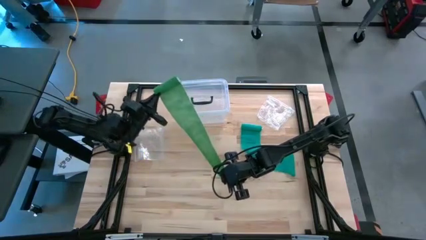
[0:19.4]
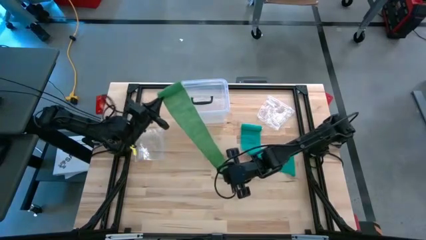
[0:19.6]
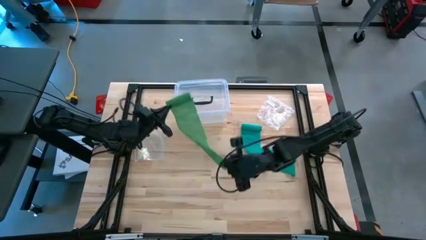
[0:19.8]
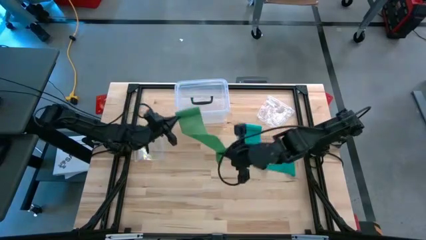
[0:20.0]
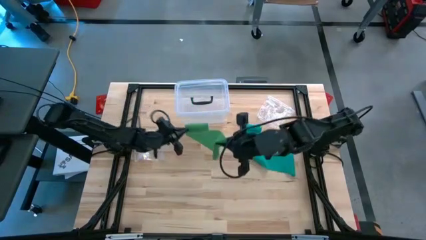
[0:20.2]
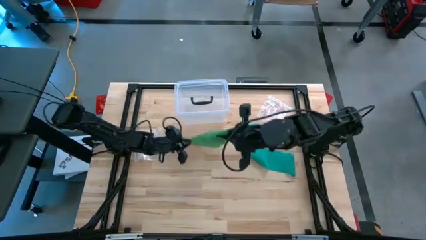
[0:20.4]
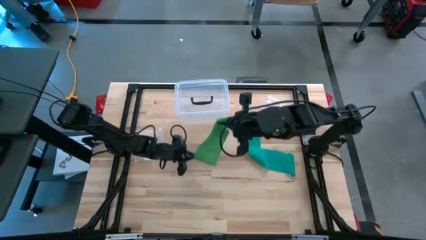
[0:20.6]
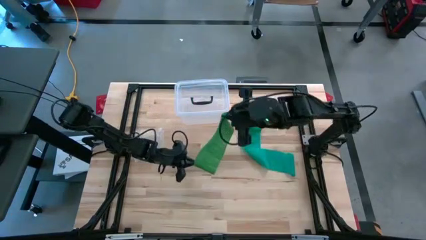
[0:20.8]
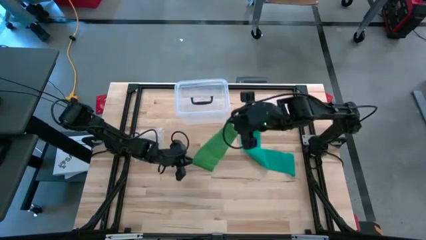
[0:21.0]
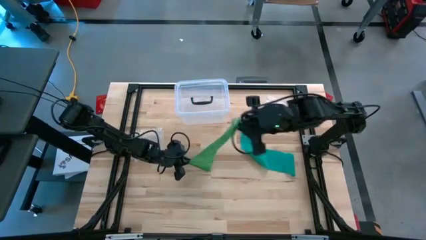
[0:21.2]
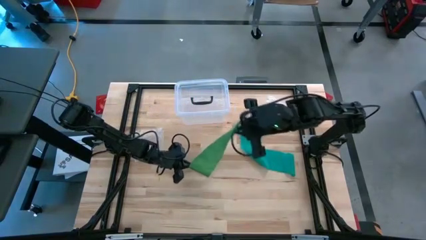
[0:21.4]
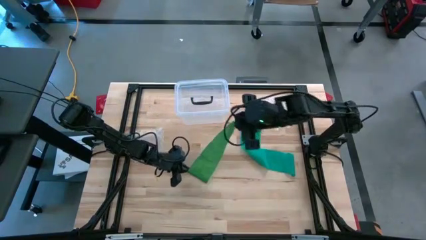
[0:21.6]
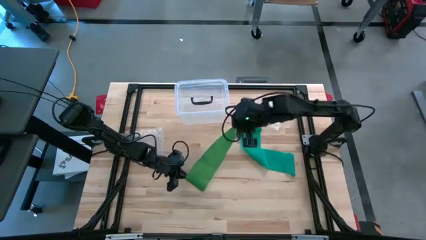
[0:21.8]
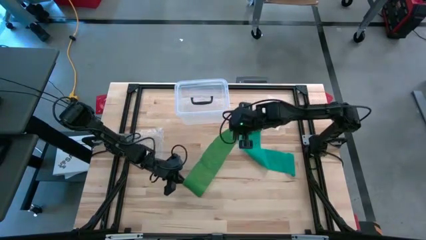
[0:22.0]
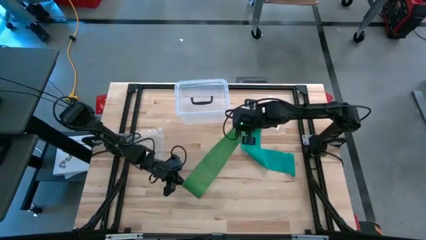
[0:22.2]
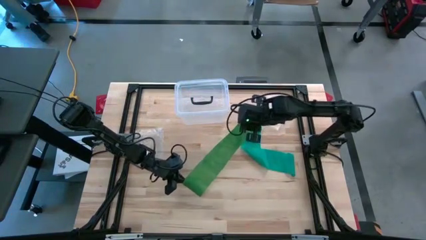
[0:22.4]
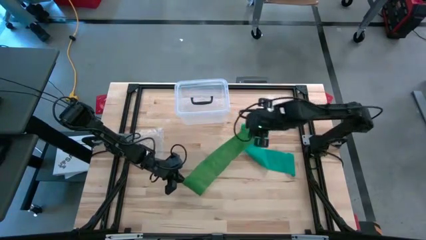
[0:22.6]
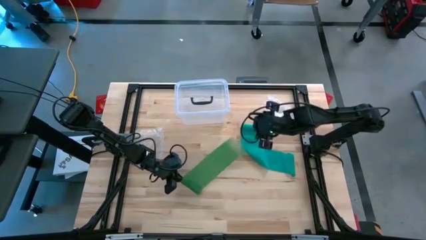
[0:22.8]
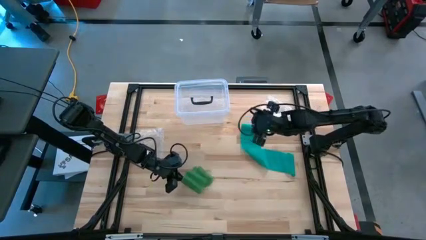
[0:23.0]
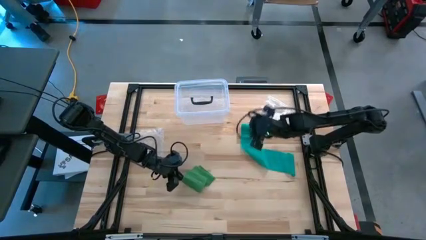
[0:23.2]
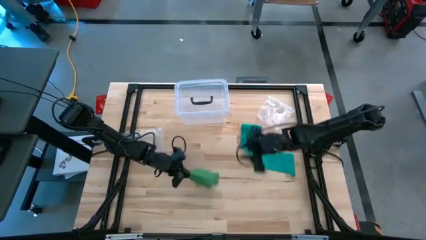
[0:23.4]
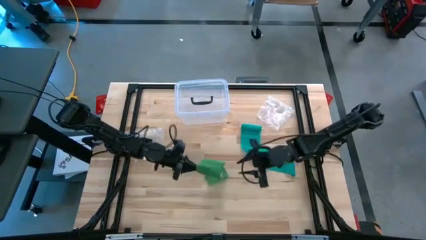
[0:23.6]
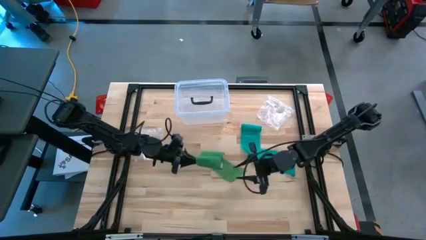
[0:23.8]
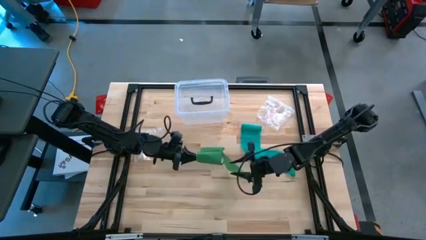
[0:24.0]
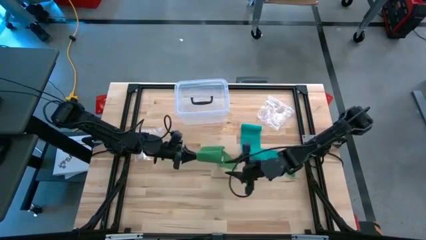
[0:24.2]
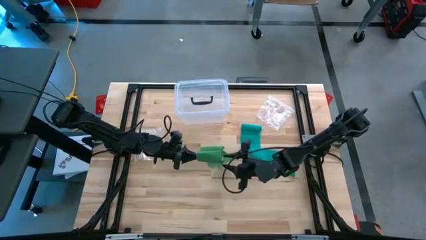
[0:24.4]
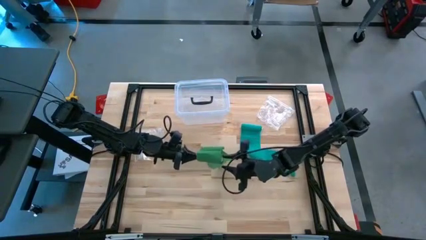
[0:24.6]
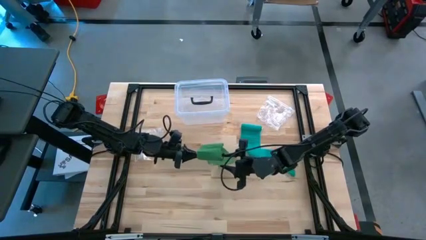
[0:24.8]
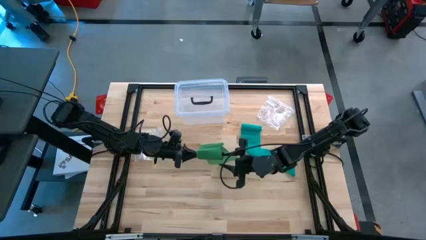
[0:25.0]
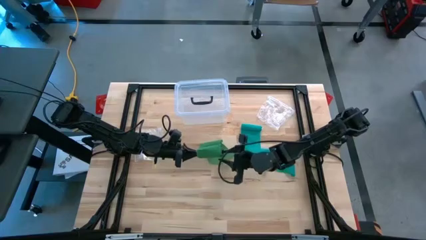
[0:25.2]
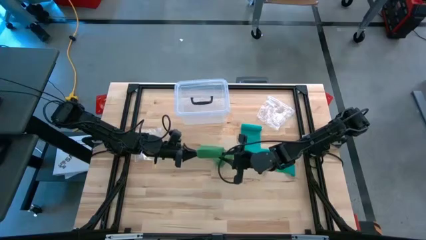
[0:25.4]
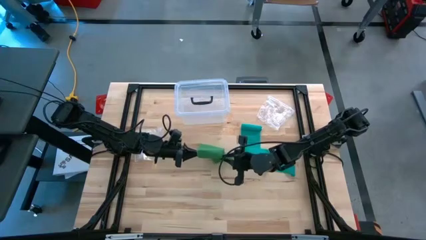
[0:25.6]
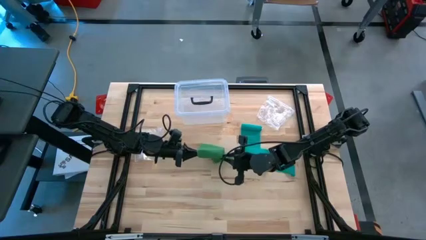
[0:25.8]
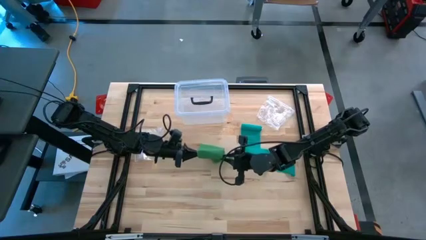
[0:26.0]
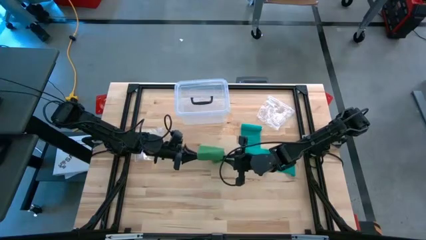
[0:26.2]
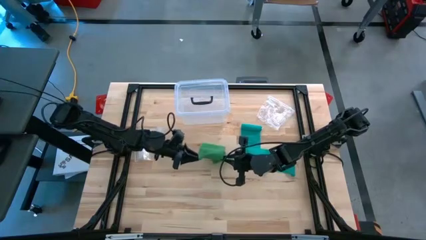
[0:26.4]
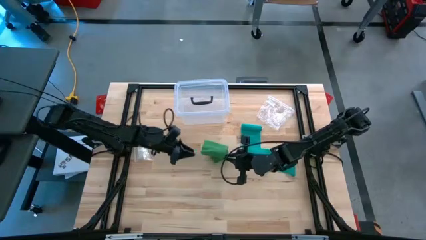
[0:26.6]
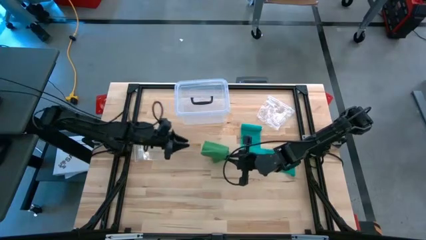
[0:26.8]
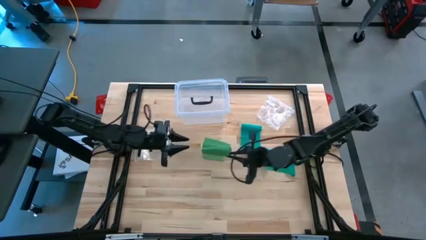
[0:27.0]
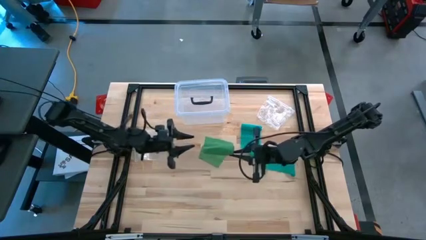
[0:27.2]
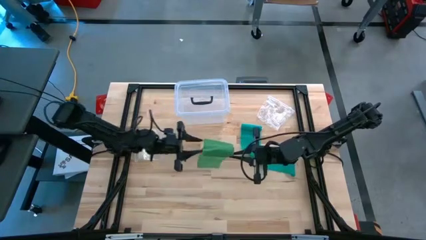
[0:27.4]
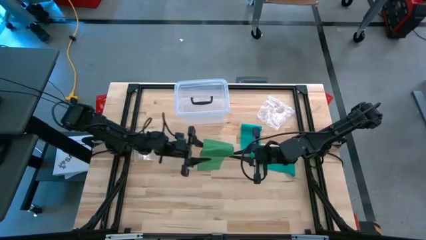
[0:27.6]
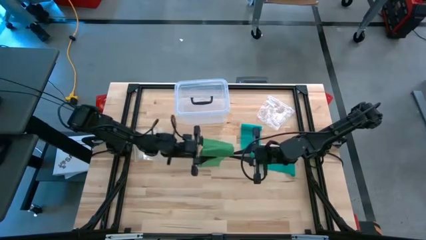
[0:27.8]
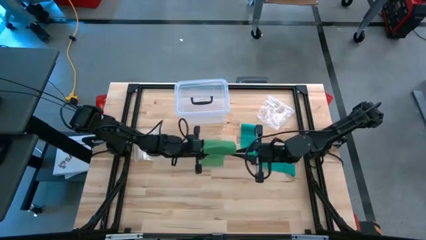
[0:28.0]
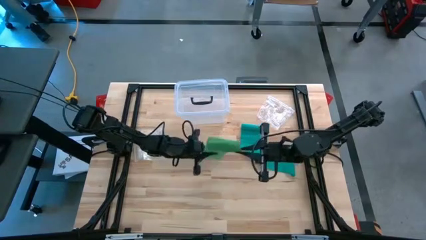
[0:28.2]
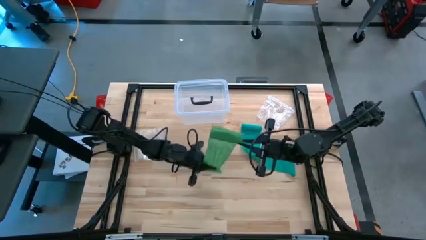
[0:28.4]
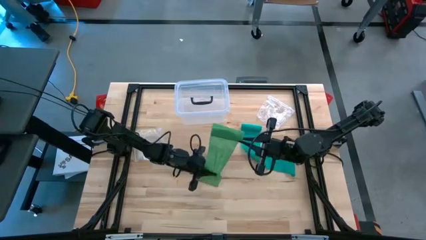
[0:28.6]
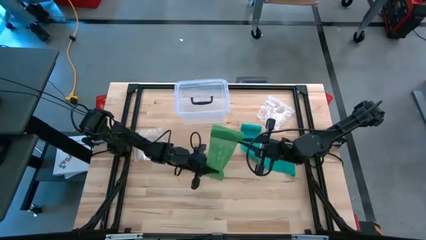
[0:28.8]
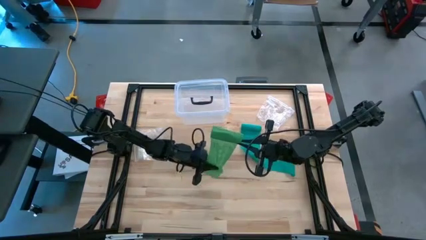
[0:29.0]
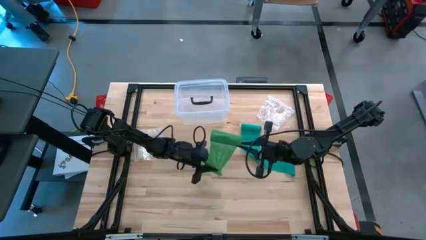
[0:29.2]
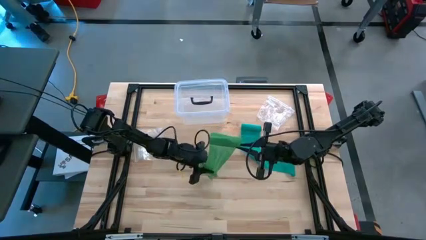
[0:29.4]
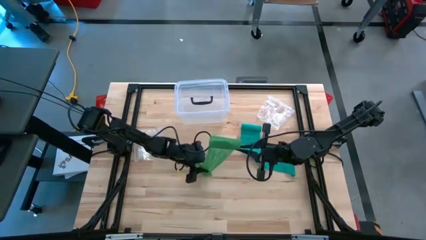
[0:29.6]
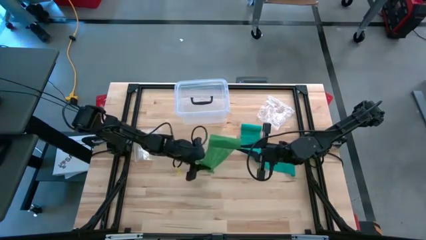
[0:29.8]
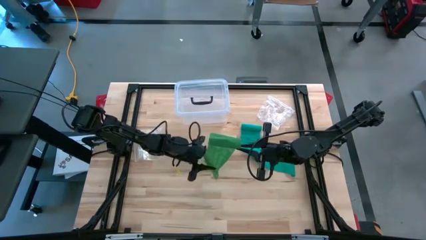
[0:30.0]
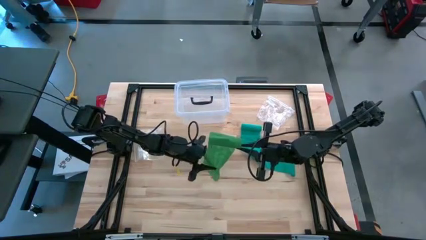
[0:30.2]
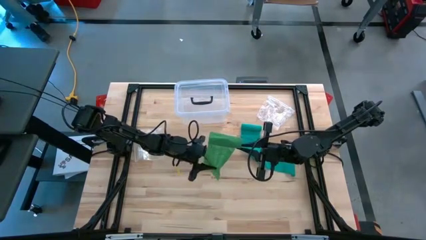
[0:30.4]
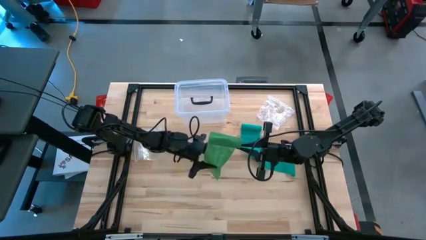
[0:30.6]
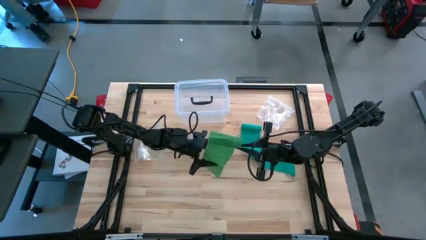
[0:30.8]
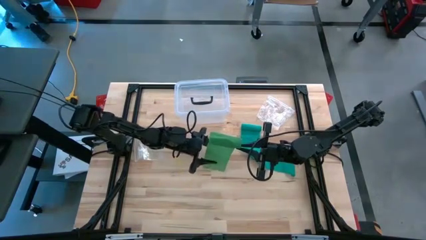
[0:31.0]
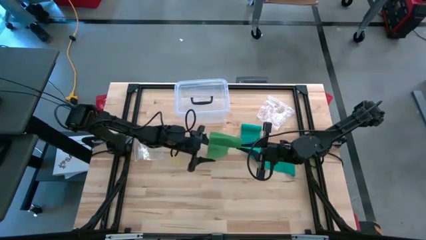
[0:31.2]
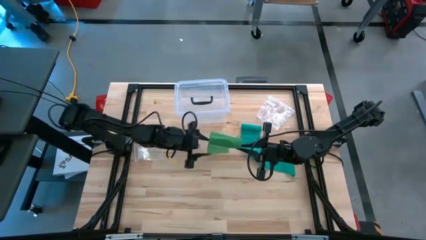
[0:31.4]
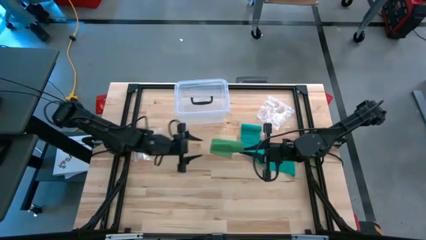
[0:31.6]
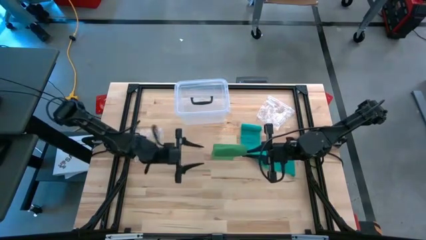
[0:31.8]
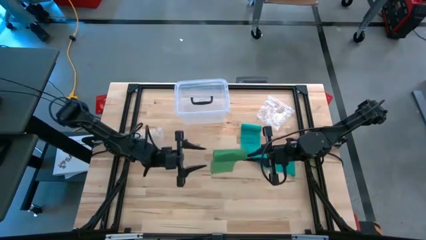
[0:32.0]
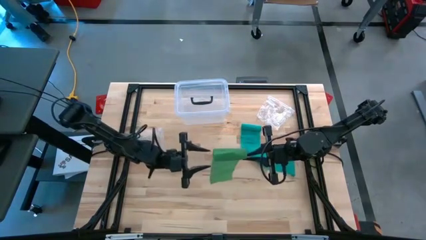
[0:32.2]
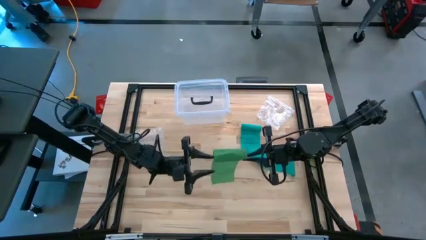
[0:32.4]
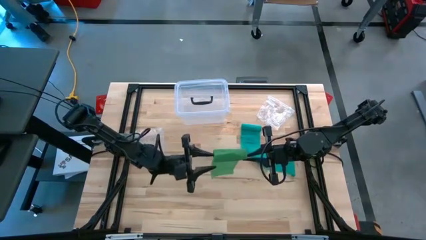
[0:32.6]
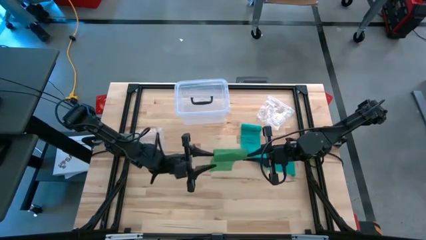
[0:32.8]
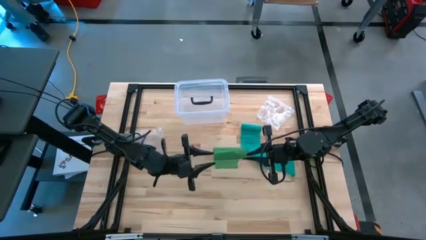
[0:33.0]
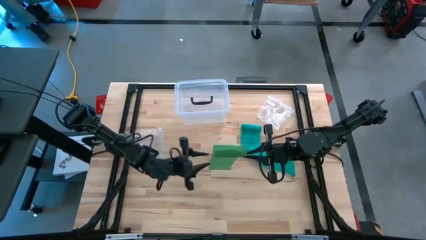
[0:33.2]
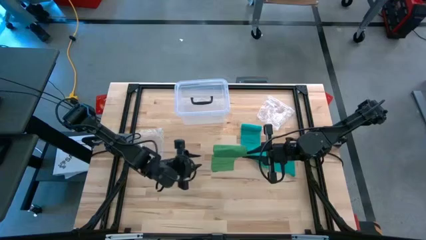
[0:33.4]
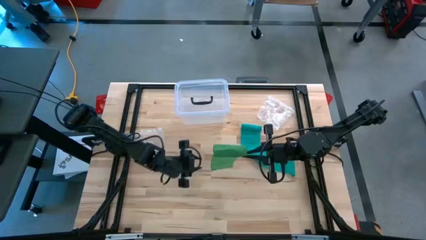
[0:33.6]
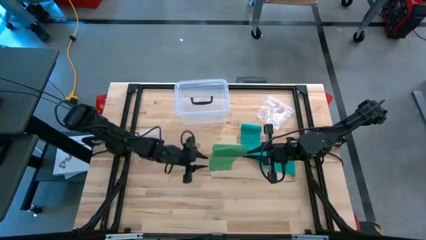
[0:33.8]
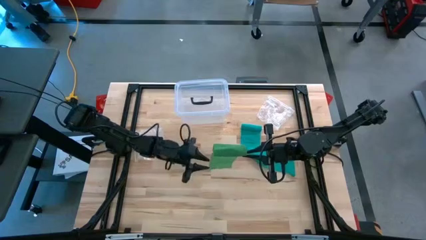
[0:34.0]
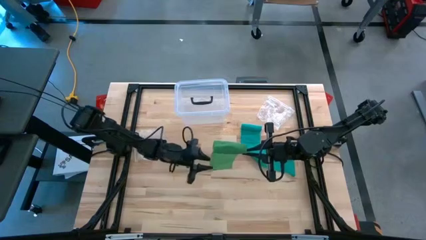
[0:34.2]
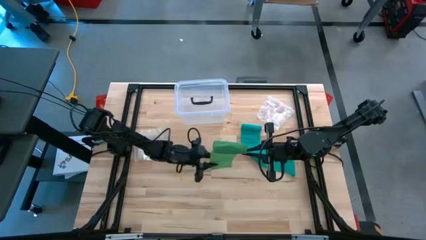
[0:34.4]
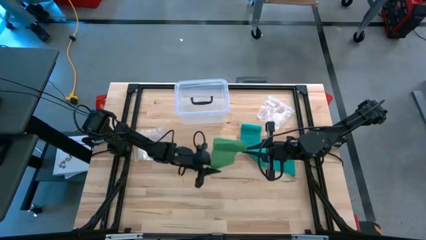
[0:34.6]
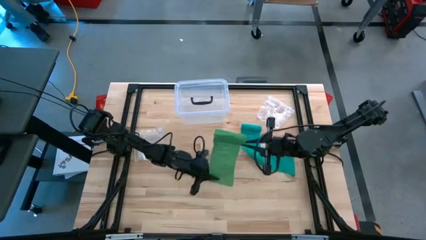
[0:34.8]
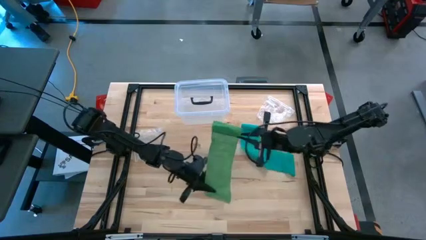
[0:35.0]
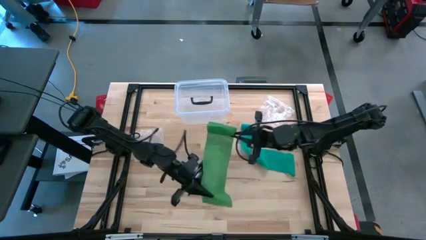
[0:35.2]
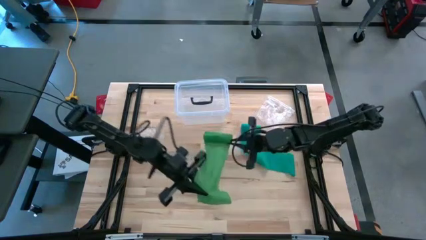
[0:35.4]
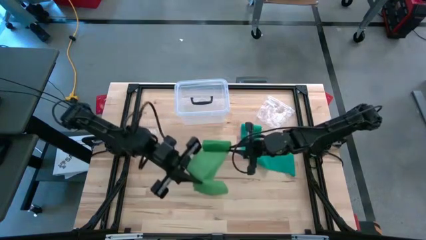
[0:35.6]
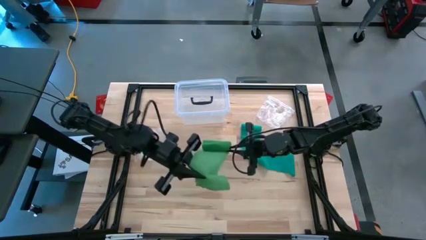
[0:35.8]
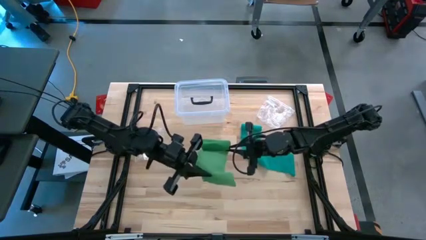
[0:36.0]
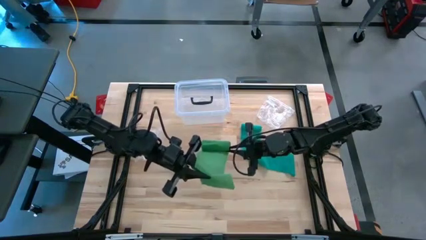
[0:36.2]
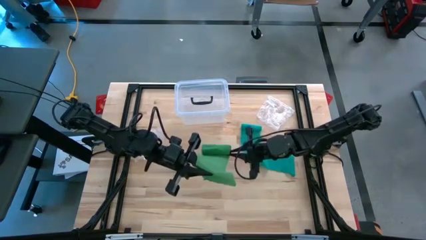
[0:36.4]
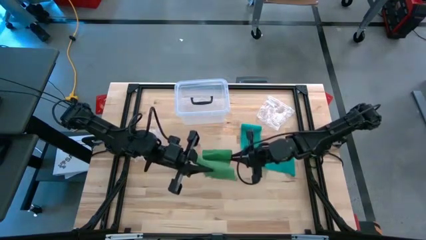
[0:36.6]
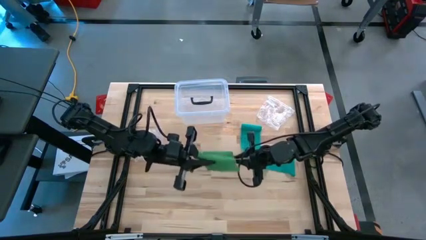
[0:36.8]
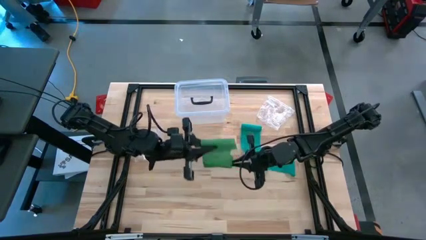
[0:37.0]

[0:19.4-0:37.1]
Task: Roll bandage
Roll the green bandage
